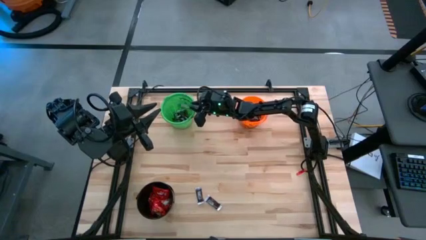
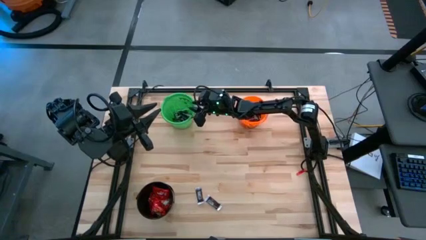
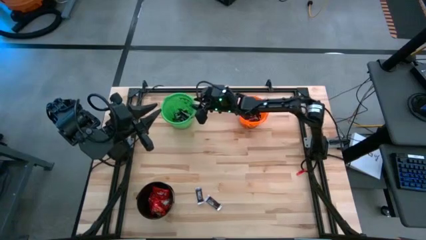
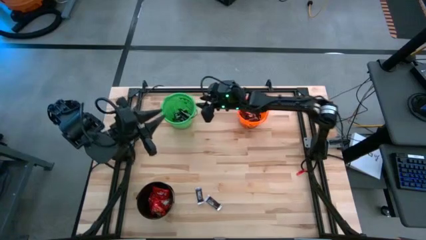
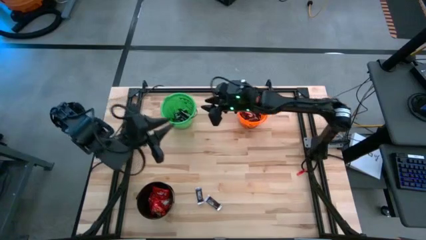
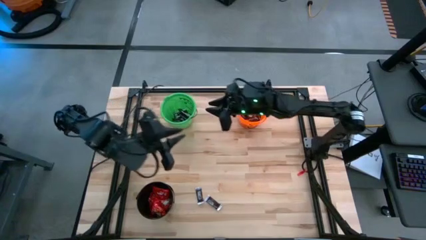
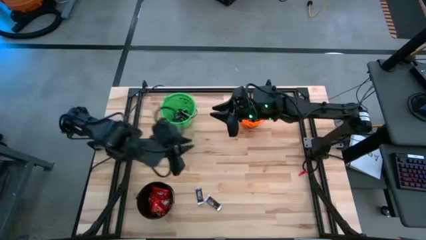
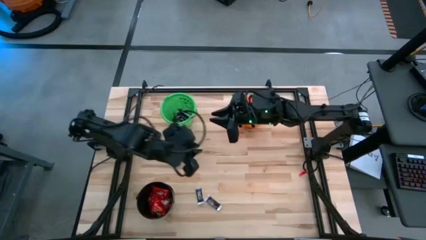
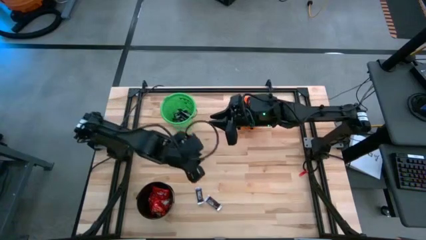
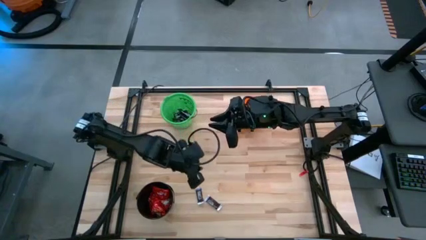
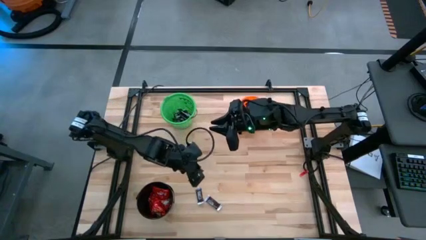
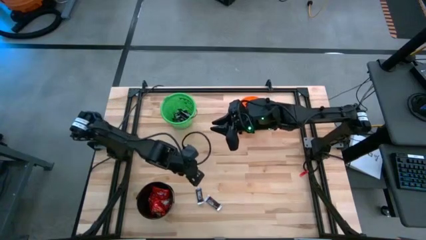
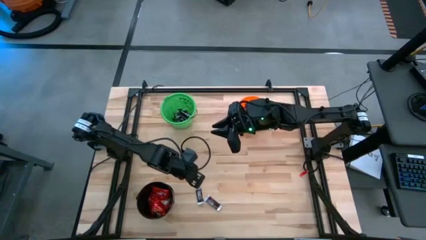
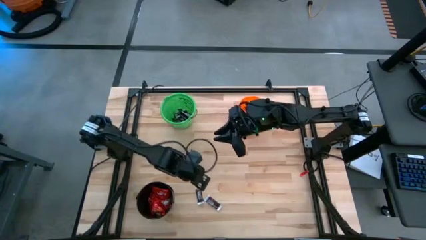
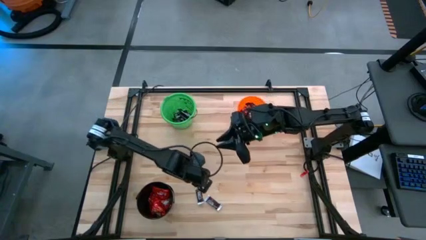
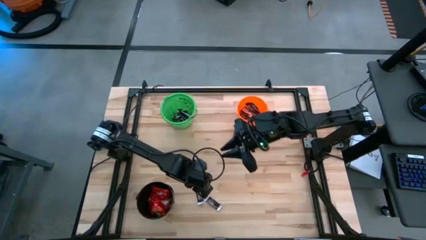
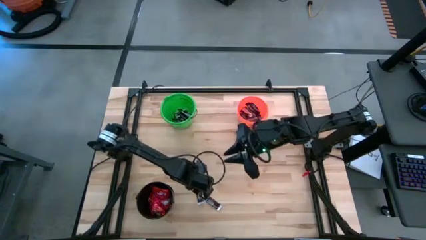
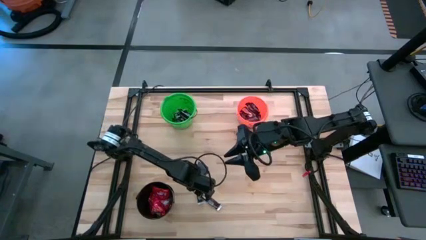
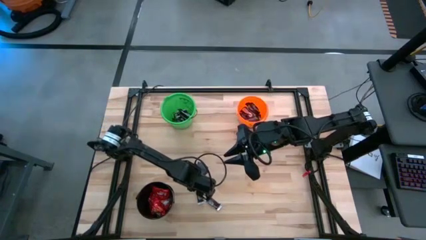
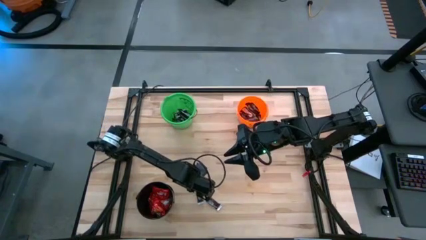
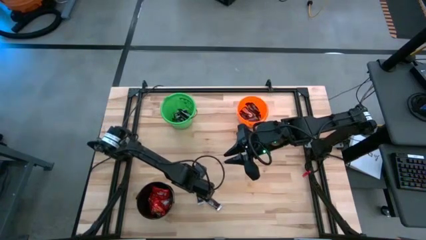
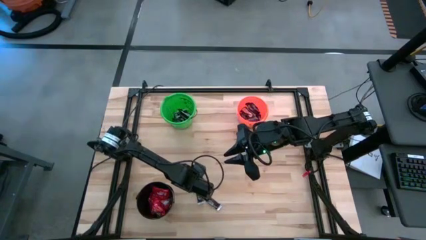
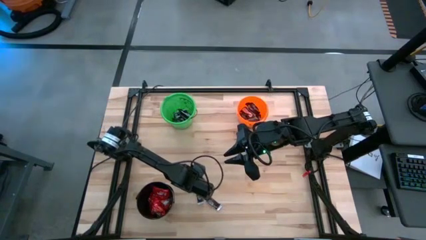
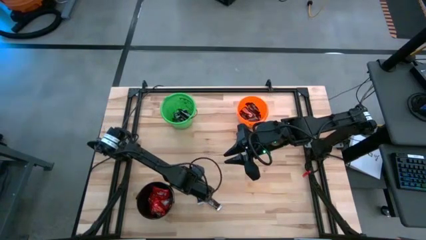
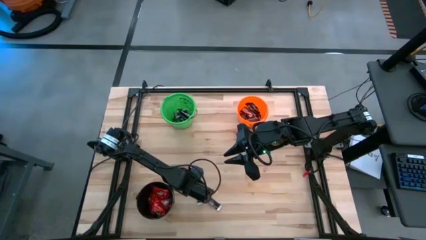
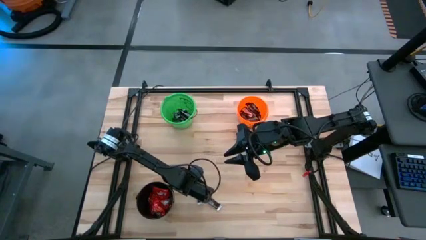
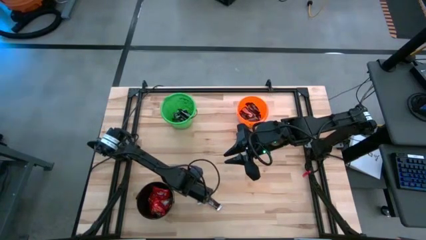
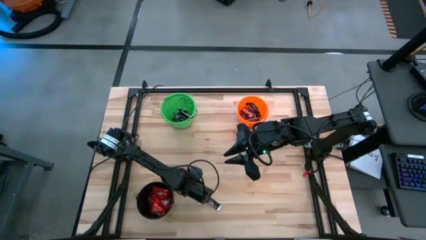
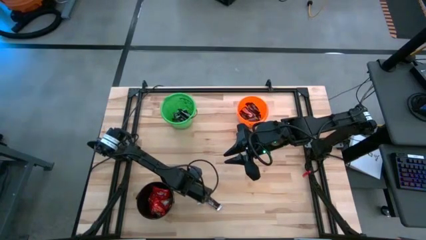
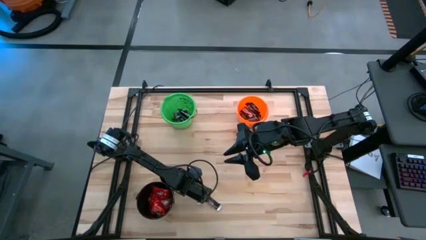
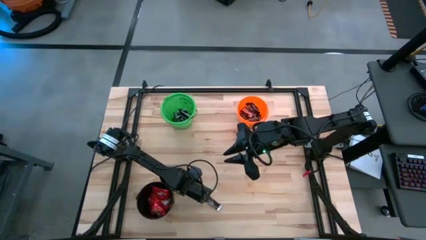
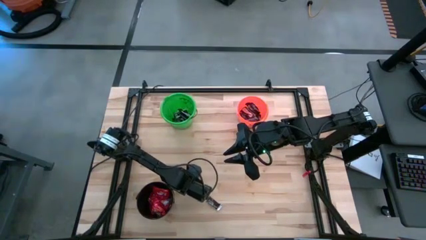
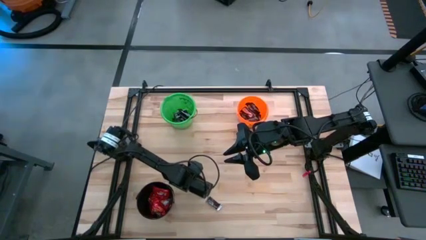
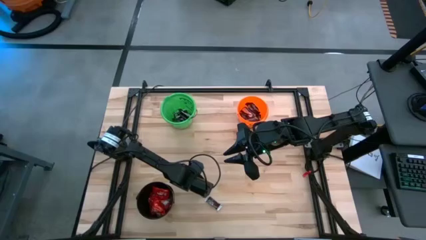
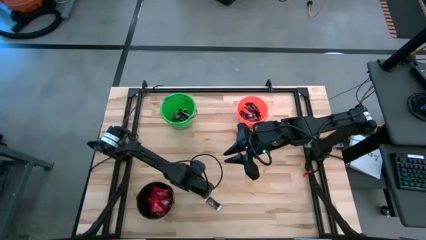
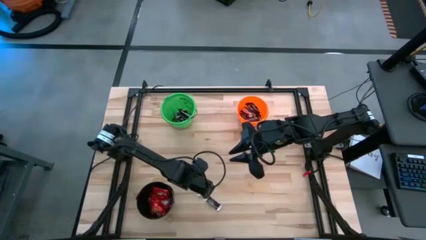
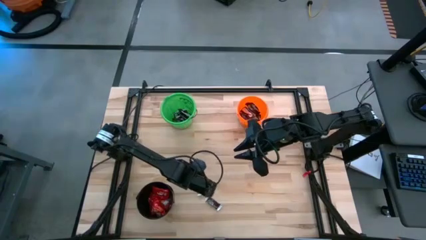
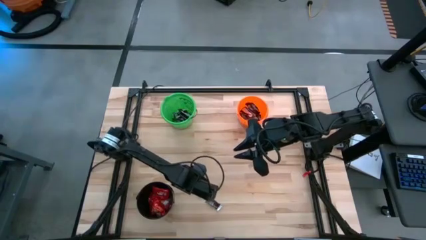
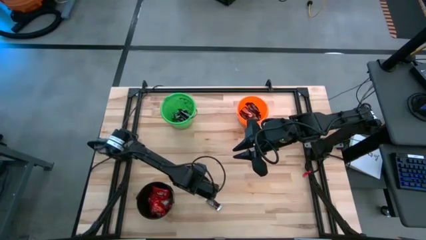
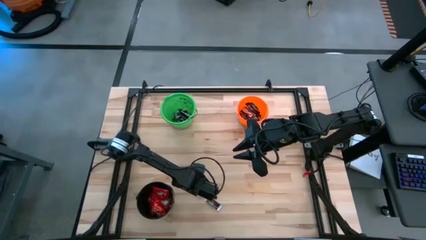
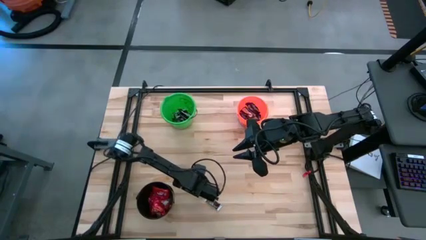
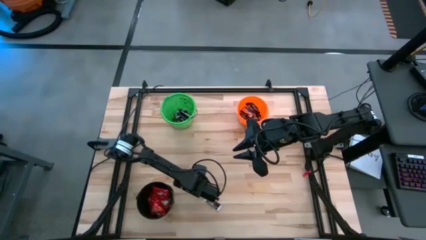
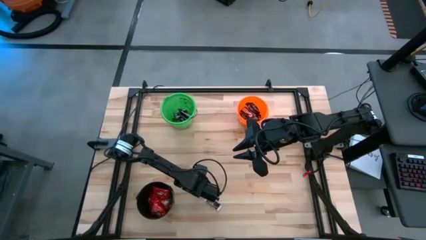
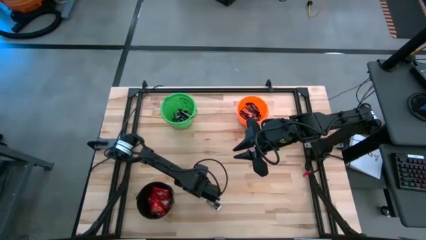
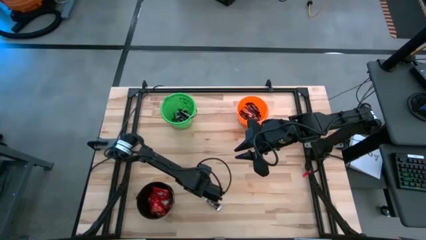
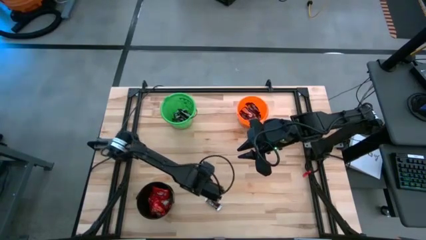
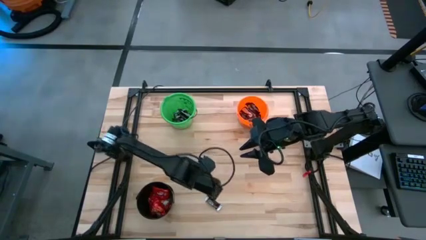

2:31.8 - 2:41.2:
Task: Sort candy
Put the black chocolate into the green bucket

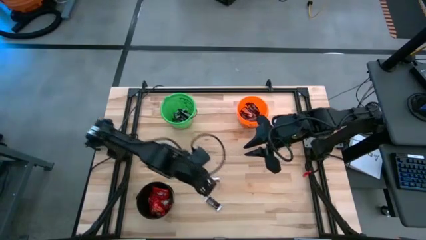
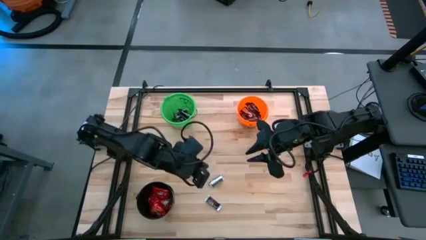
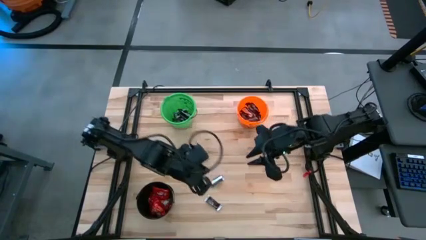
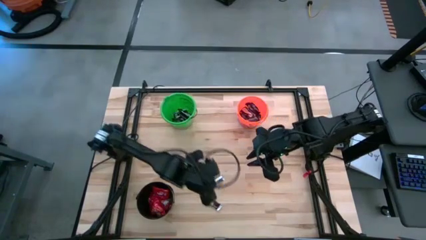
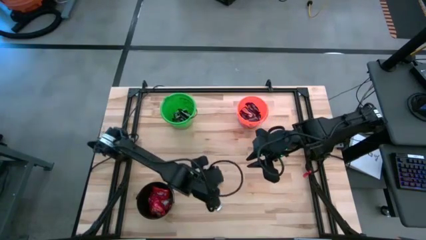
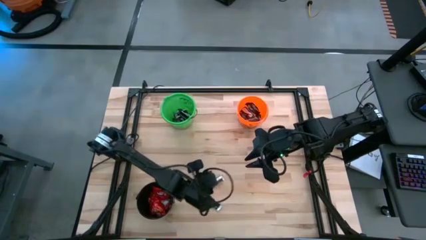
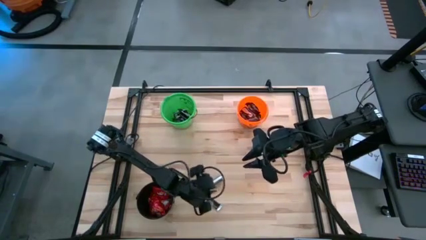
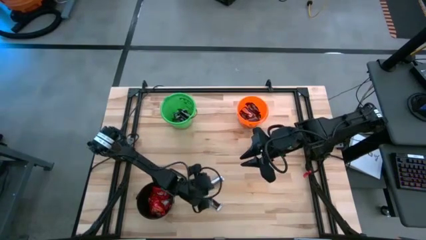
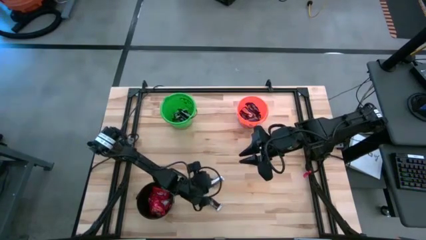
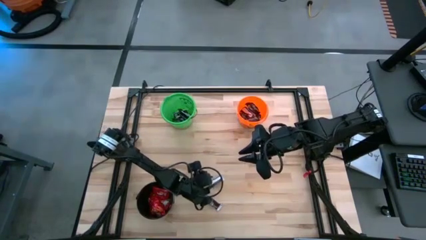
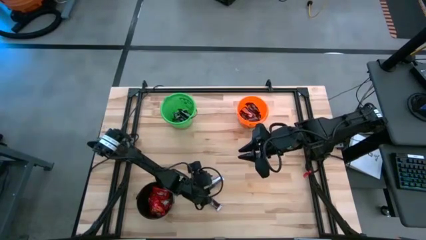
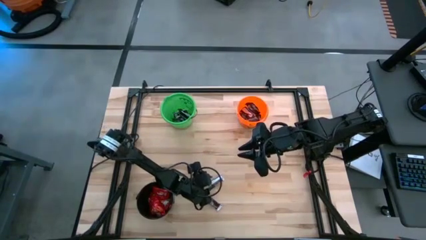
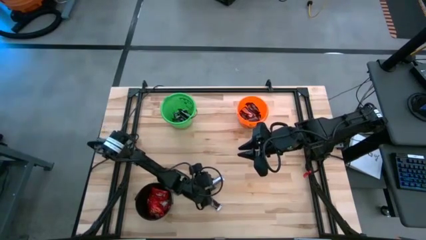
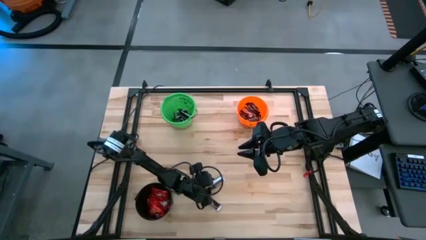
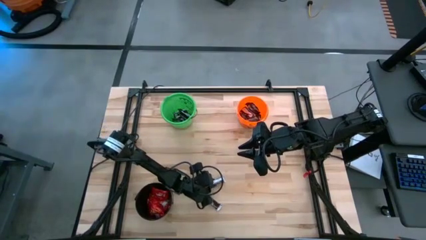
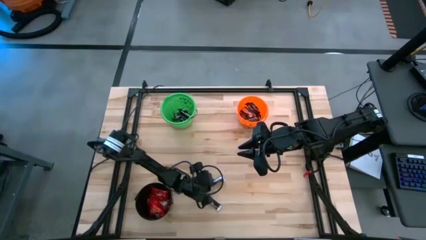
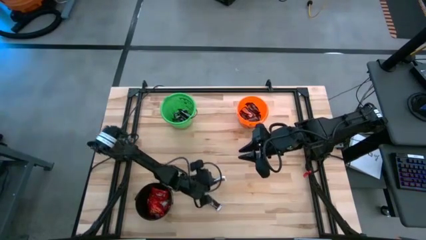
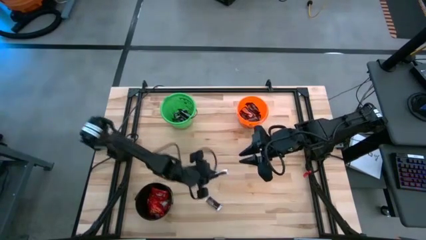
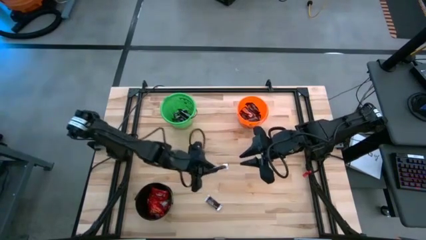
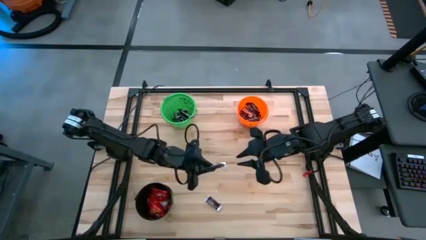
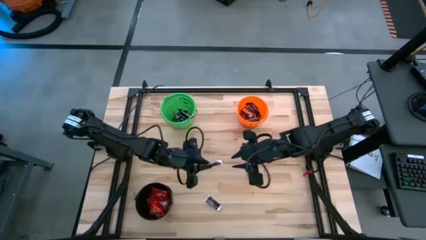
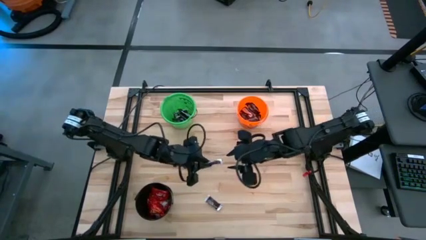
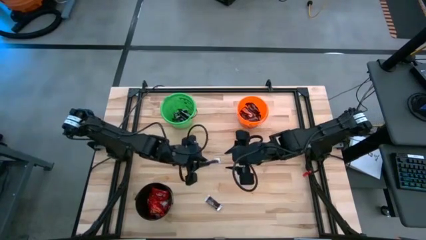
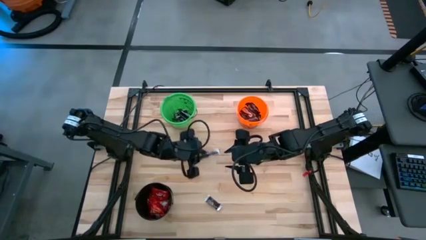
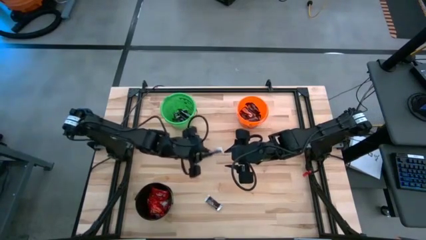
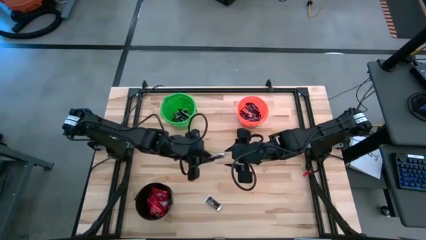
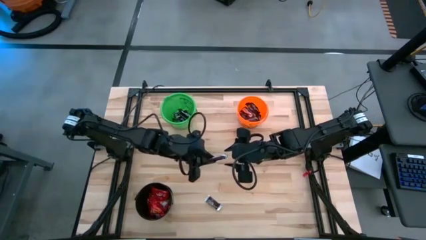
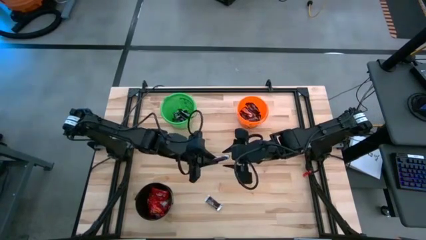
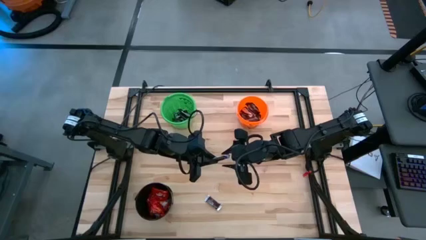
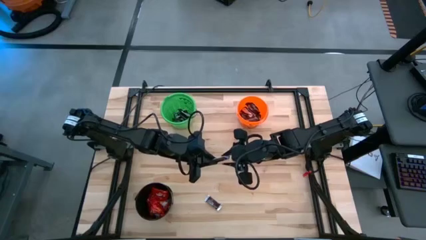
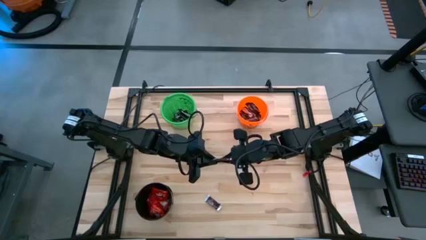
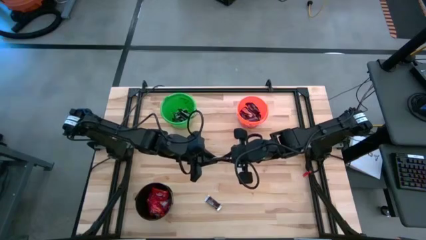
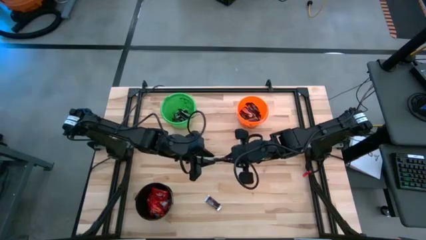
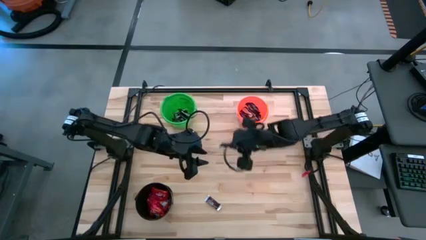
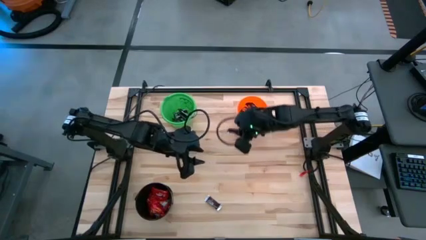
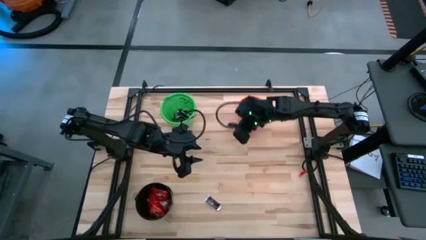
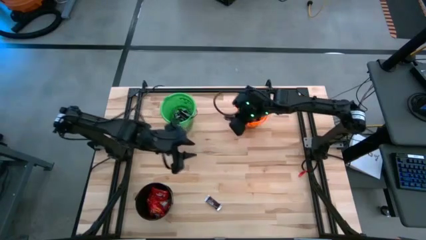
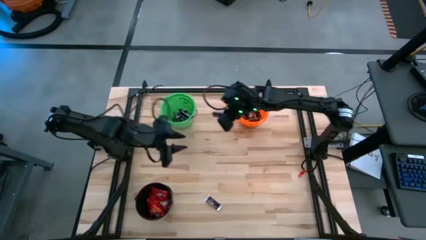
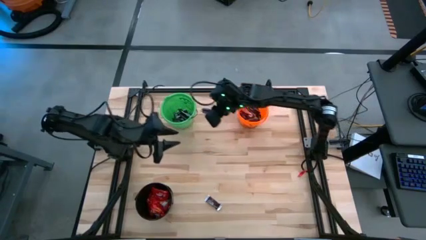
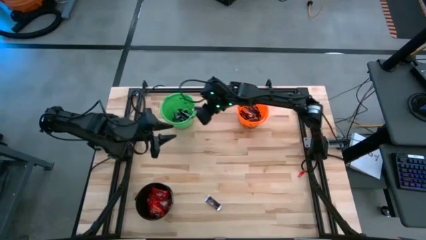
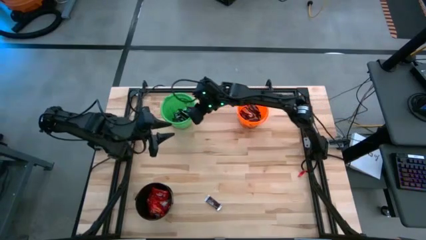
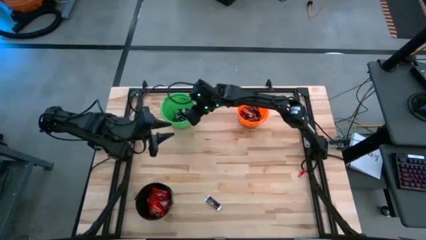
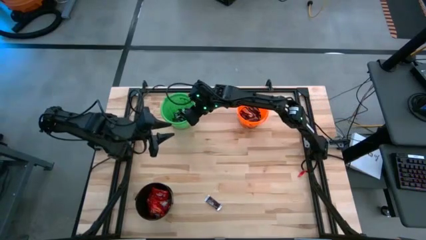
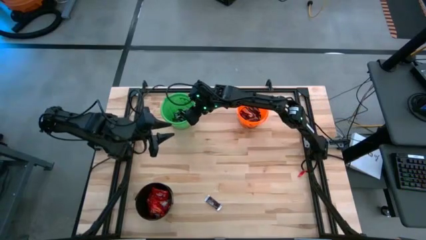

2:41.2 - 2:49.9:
Put the black chocolate into the green bucket
